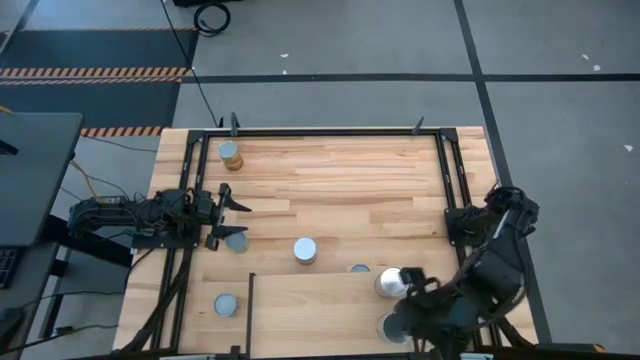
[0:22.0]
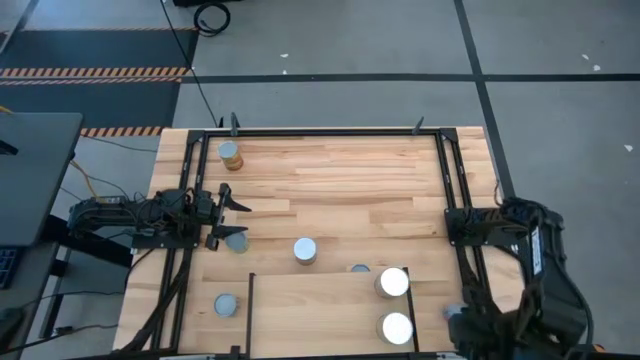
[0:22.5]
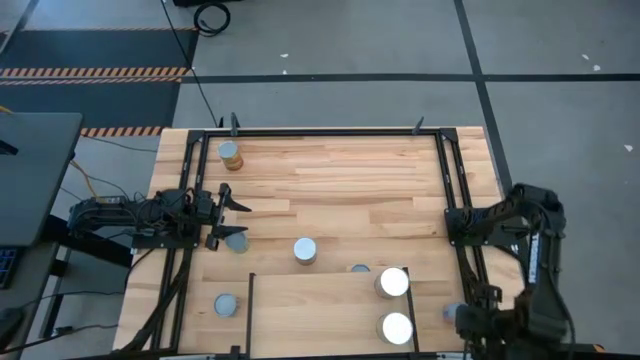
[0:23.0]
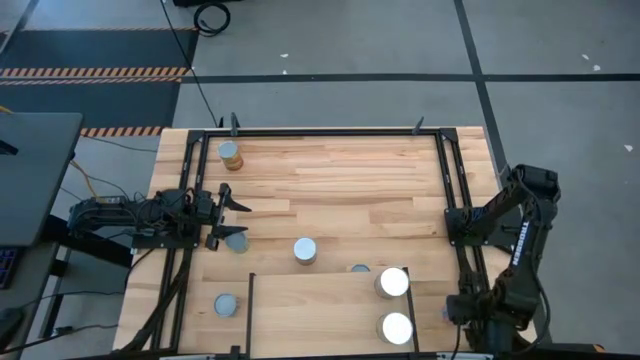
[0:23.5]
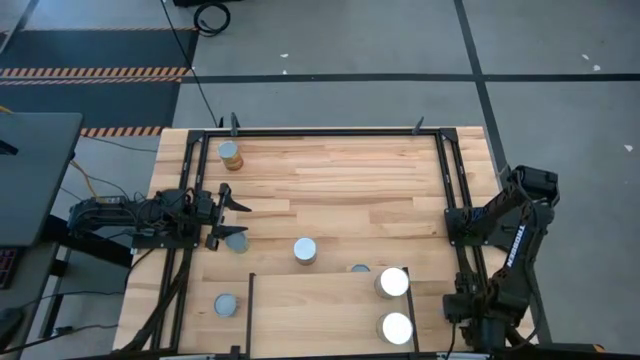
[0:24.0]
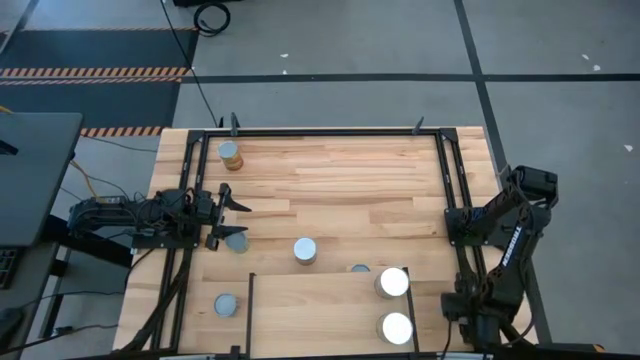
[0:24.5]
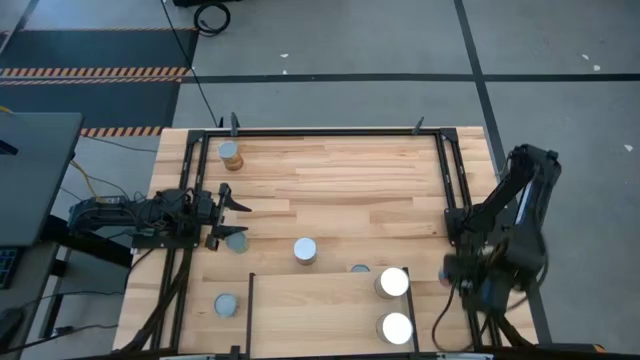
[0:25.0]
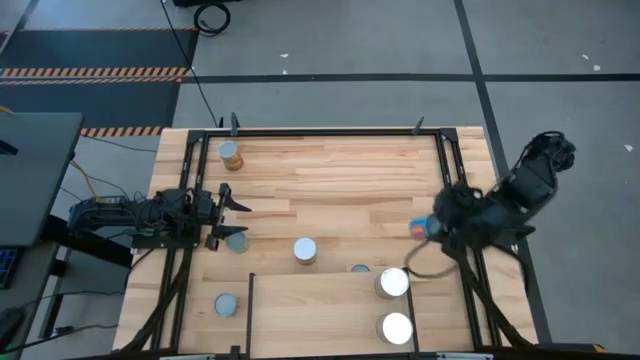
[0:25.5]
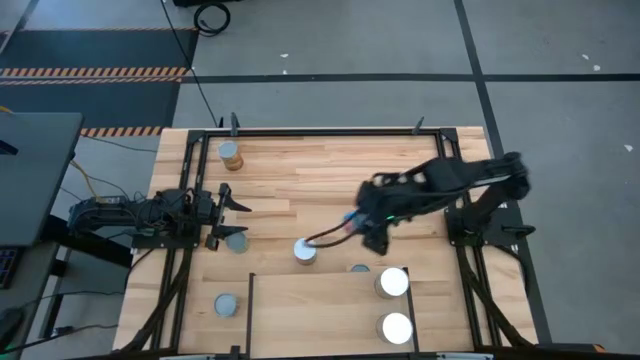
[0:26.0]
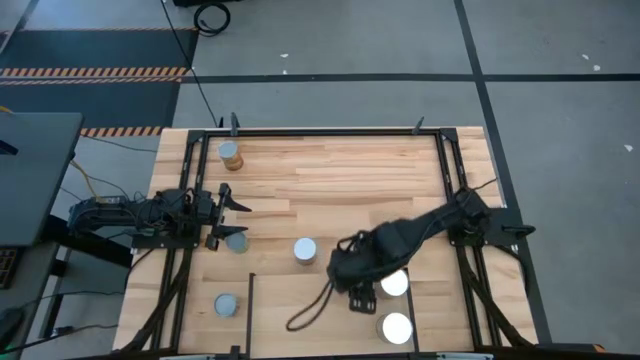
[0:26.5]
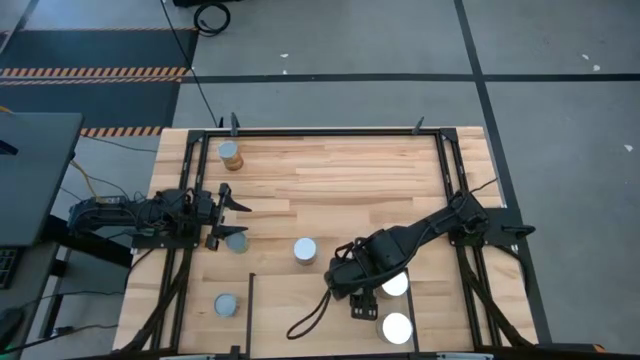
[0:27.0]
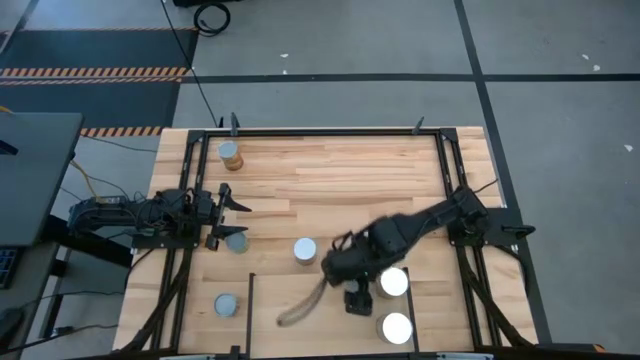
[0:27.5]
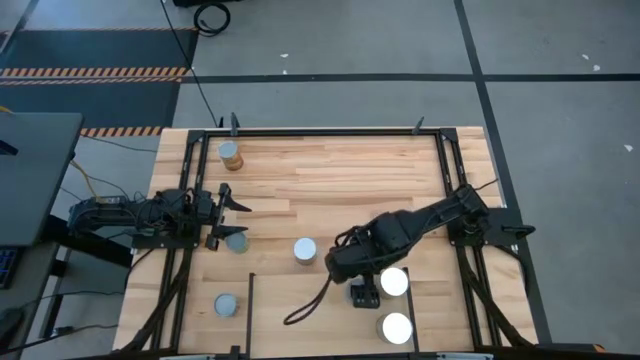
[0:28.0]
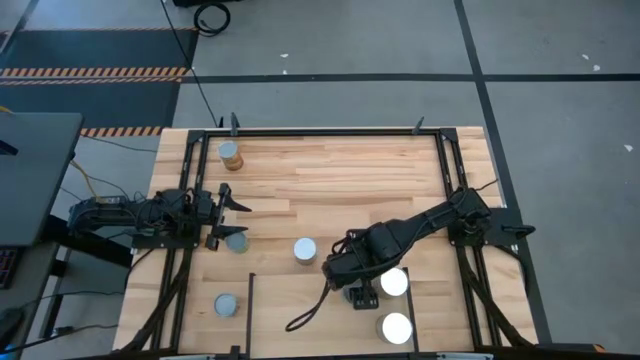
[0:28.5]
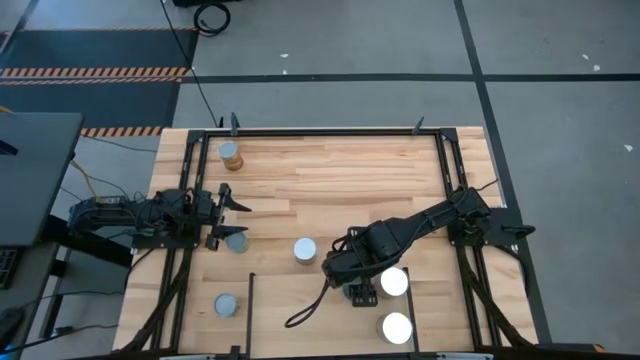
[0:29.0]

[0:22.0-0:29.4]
Task: Pick and place cans onto a shelf
Put the blue canned corn on the shelf

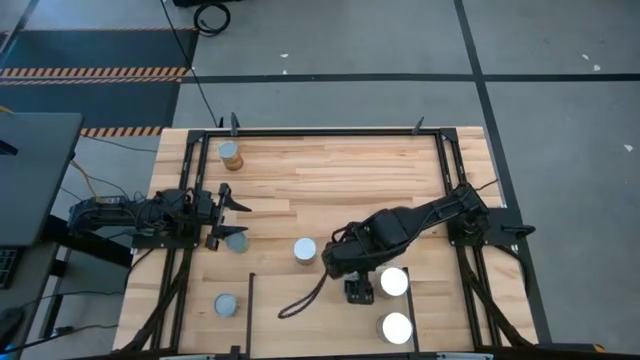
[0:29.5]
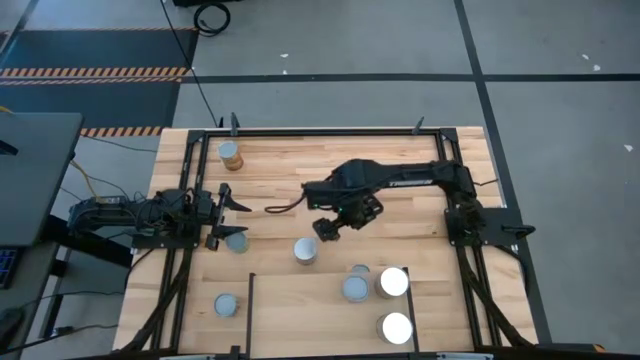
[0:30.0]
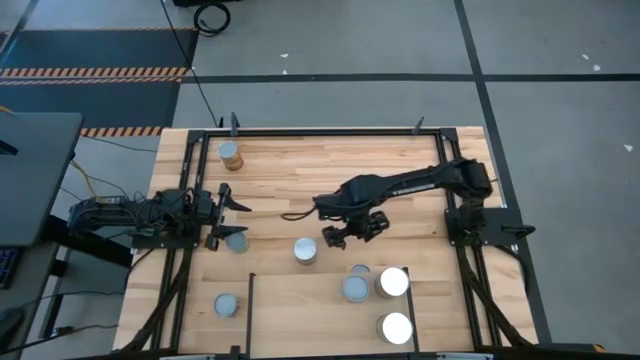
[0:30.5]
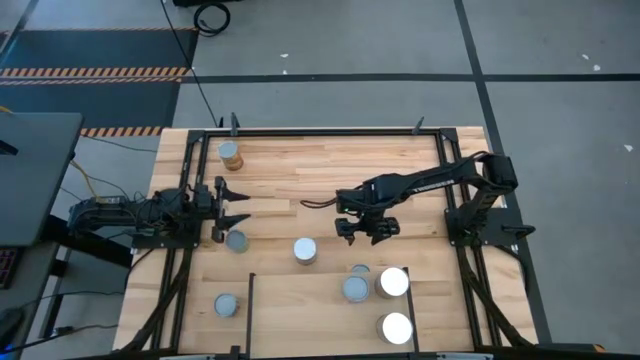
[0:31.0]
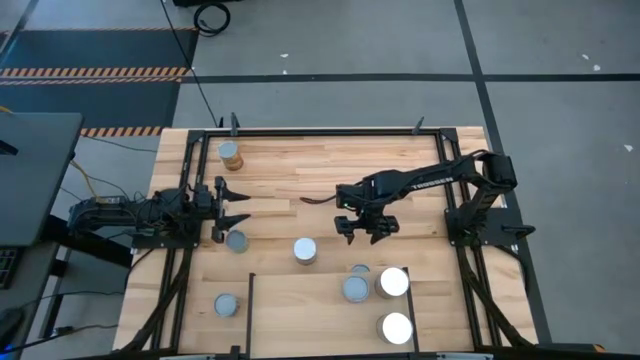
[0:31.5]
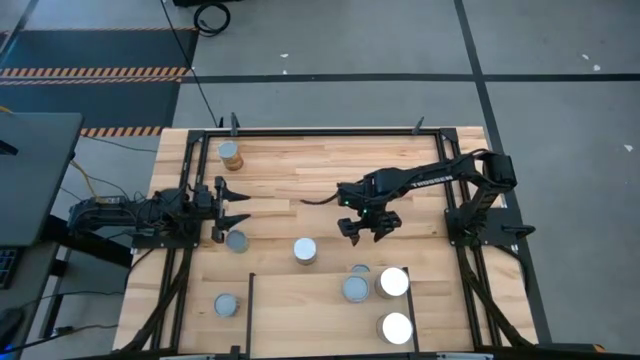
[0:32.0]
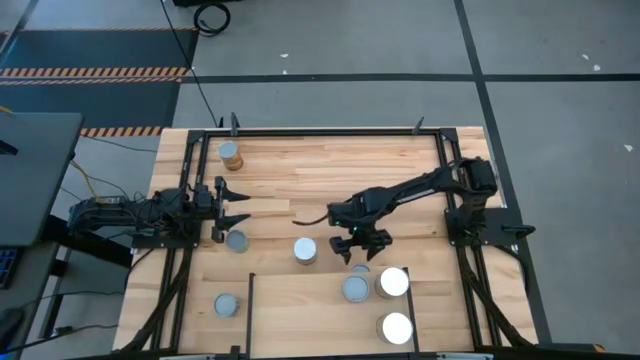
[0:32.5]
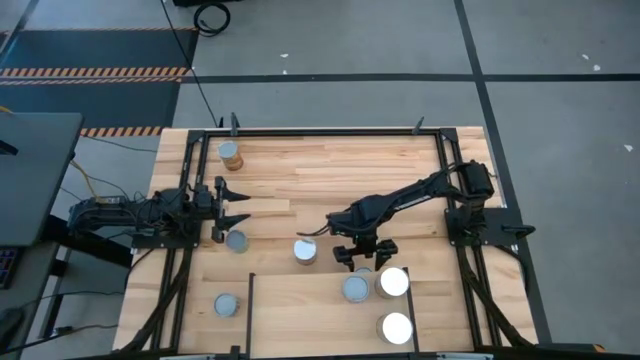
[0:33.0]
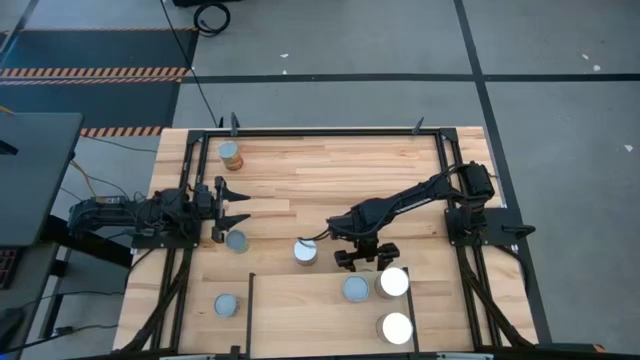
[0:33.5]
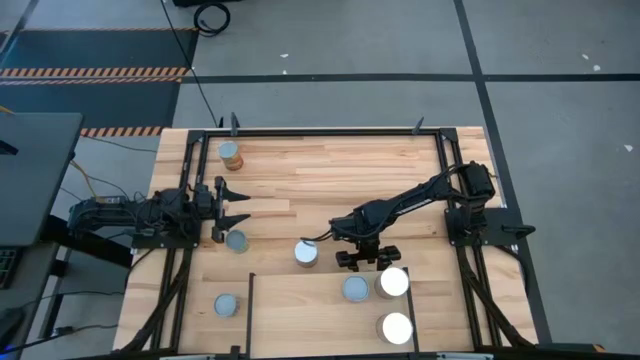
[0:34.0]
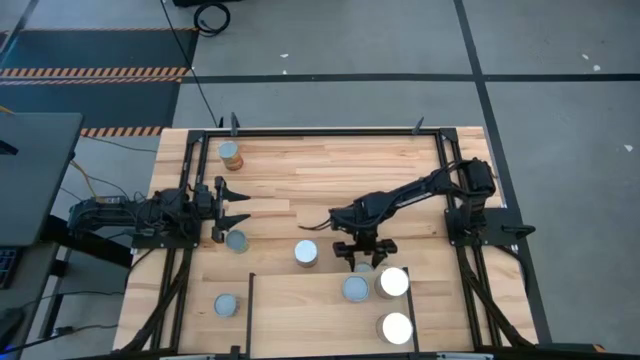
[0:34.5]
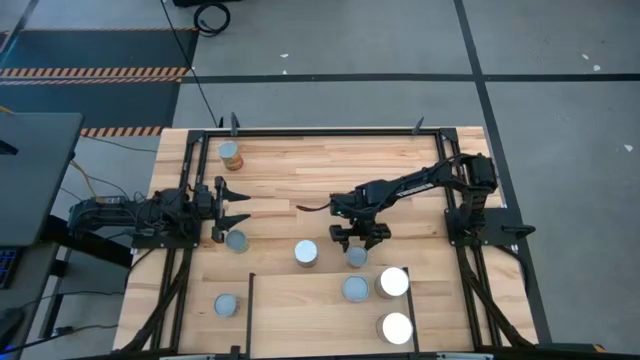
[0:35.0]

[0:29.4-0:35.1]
Put the canned oranges on the shelf

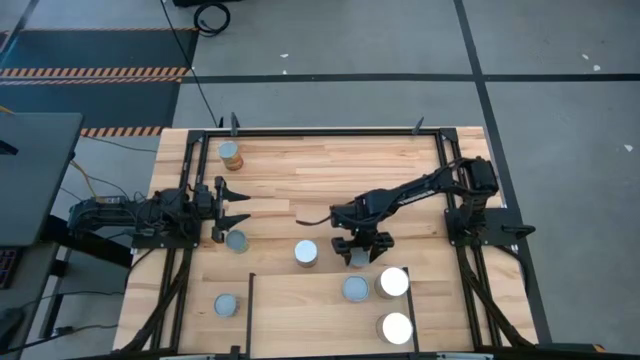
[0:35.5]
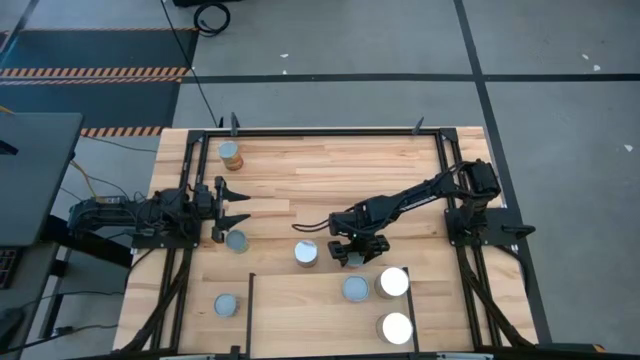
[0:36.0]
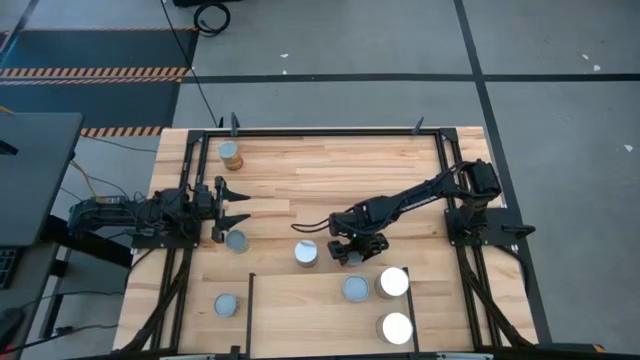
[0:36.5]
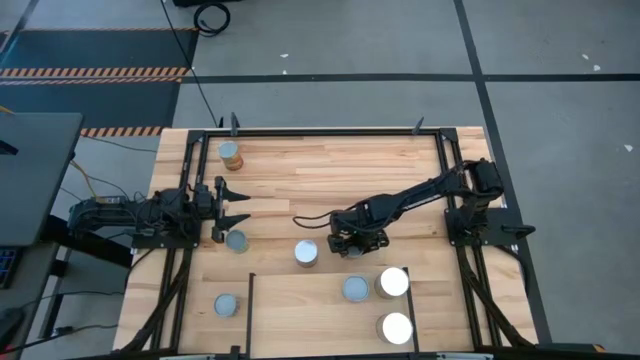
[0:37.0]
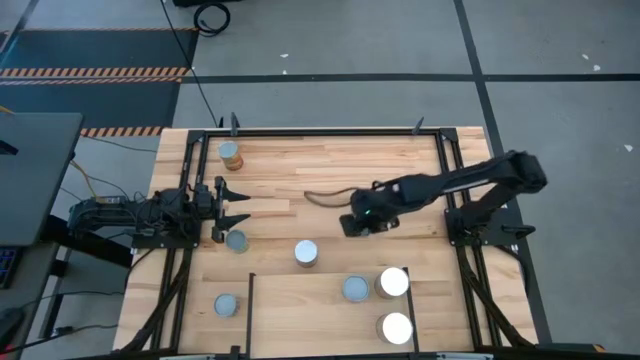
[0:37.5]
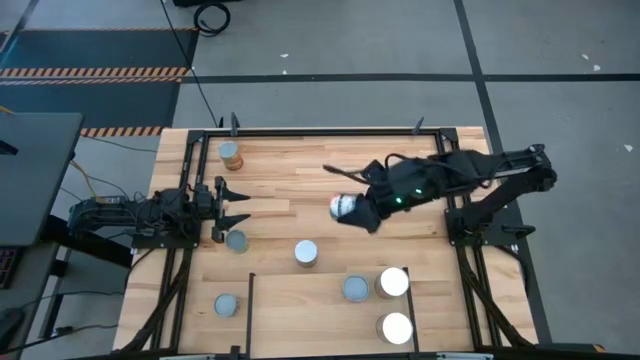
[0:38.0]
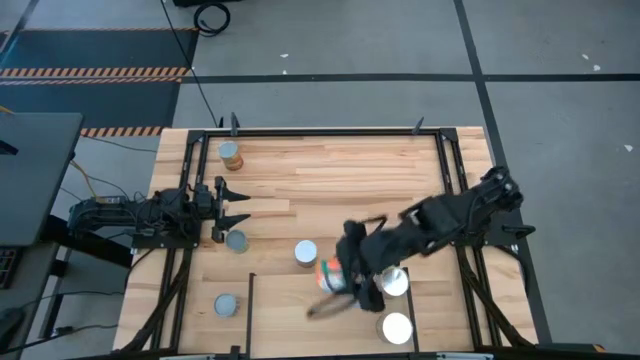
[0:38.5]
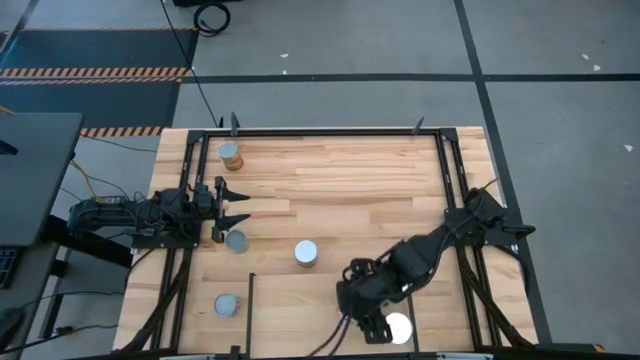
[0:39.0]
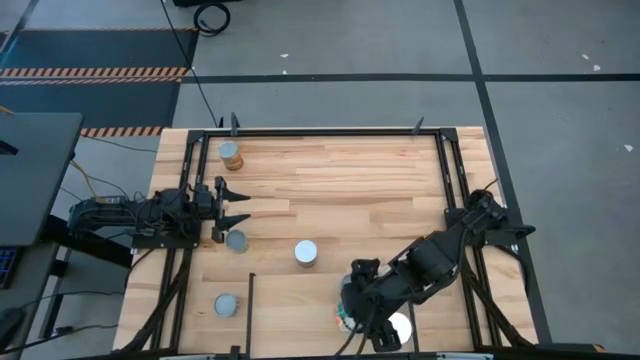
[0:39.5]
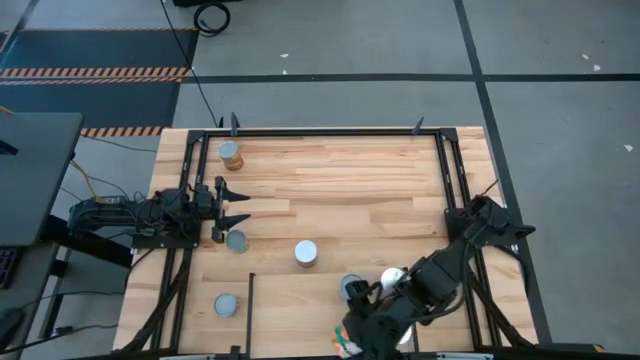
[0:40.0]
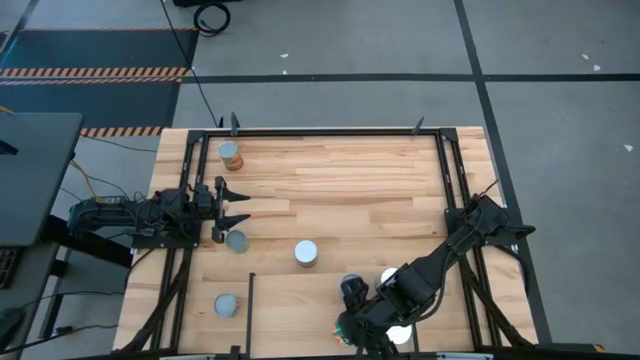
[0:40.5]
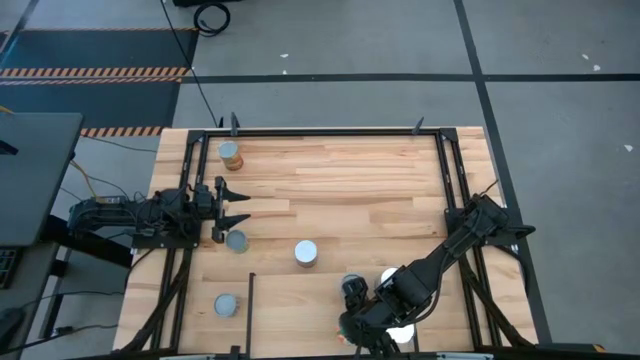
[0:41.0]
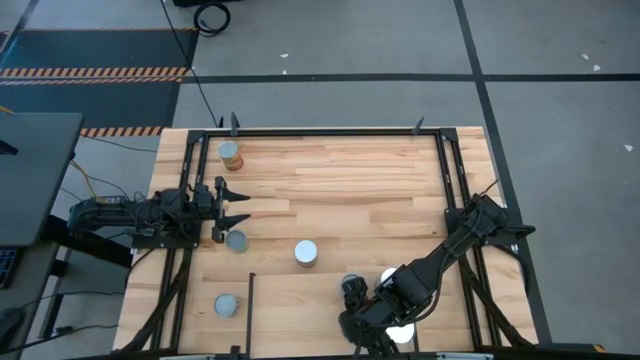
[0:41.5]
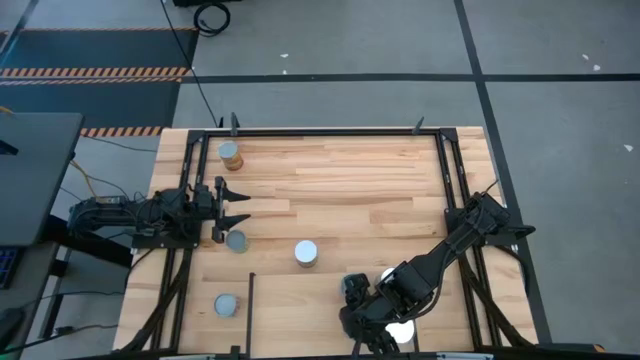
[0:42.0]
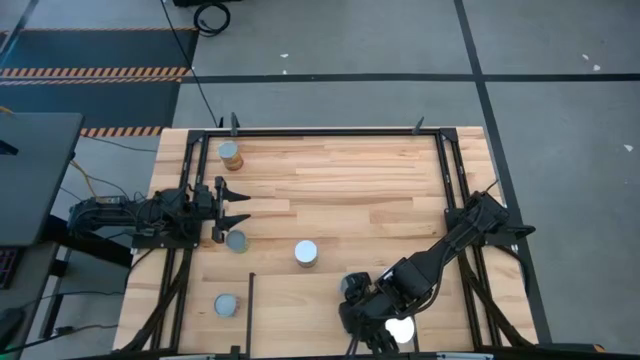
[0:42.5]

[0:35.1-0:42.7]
Put the canned oranges on the shelf
